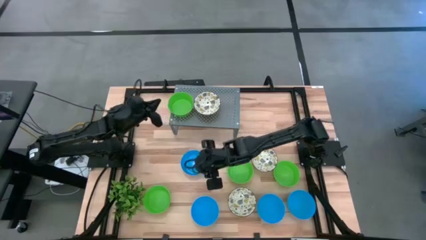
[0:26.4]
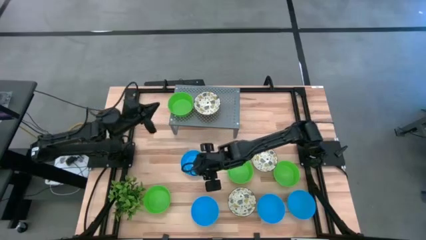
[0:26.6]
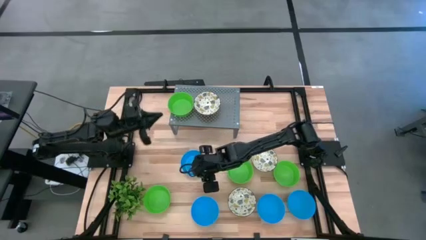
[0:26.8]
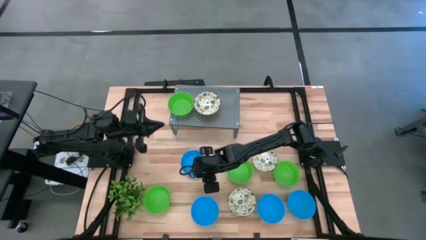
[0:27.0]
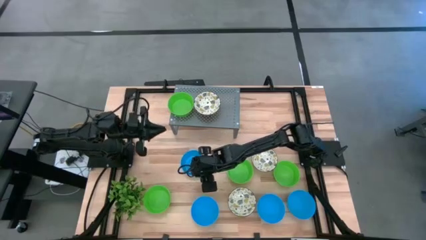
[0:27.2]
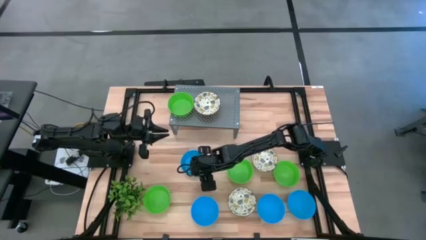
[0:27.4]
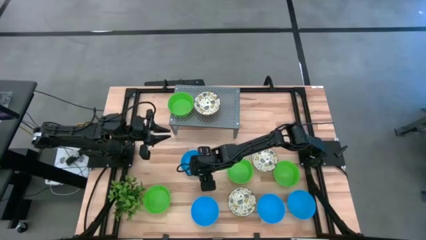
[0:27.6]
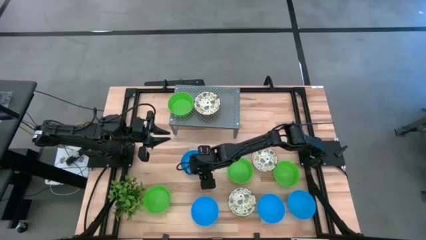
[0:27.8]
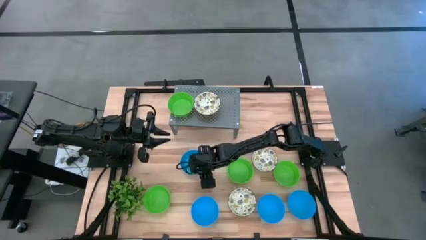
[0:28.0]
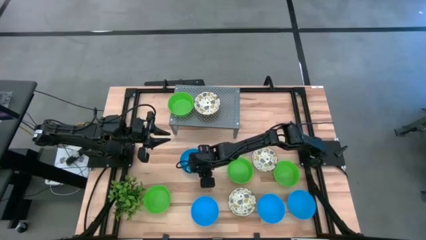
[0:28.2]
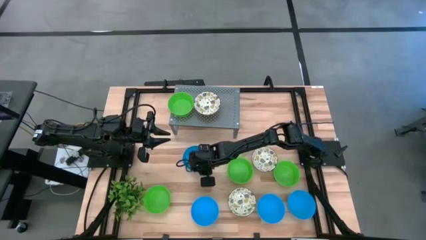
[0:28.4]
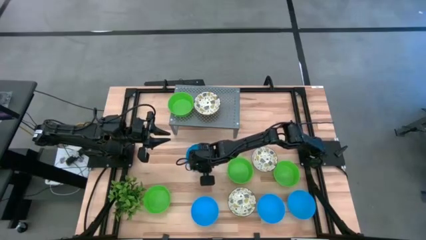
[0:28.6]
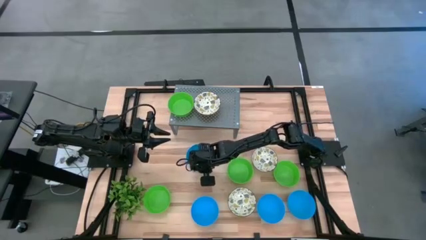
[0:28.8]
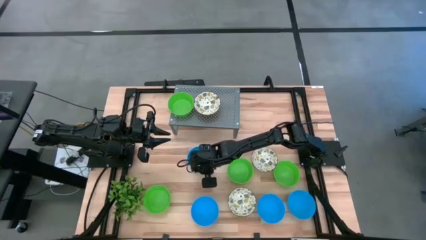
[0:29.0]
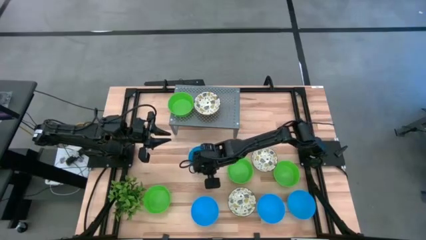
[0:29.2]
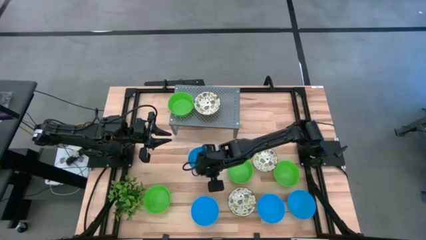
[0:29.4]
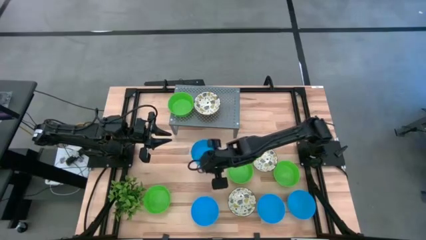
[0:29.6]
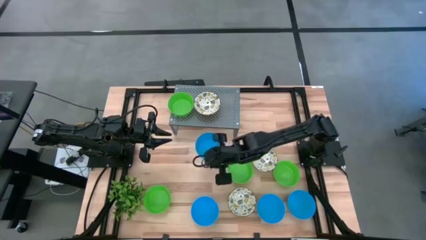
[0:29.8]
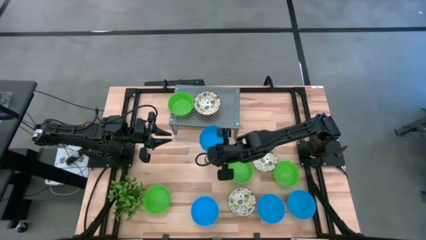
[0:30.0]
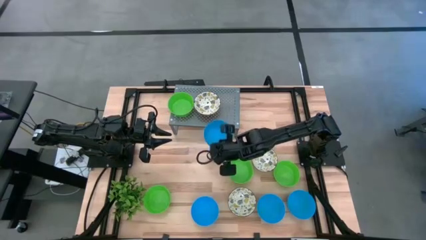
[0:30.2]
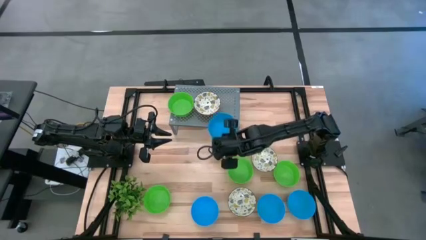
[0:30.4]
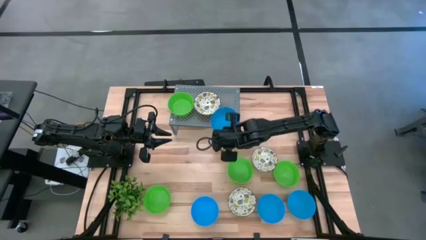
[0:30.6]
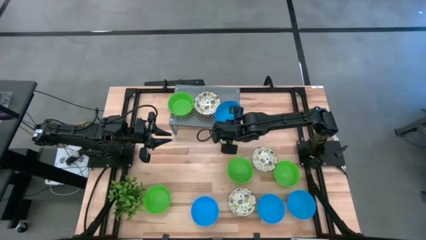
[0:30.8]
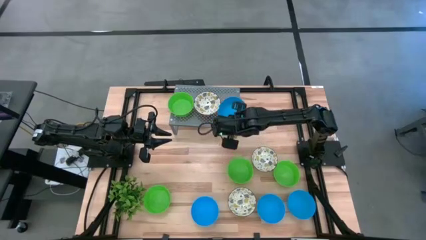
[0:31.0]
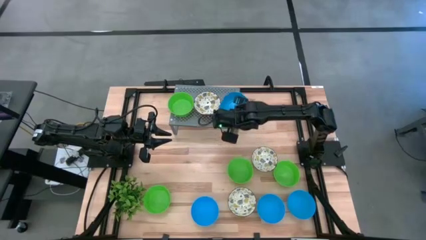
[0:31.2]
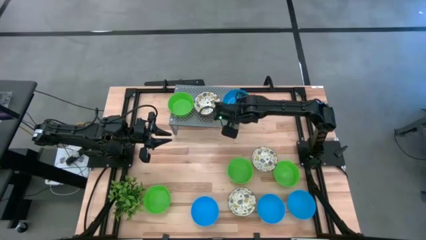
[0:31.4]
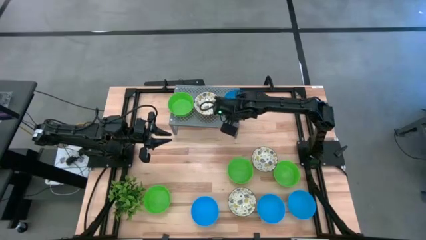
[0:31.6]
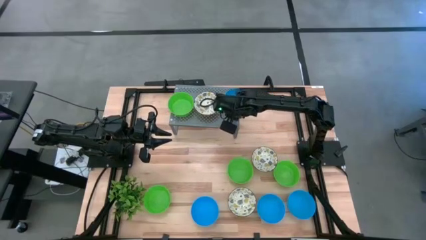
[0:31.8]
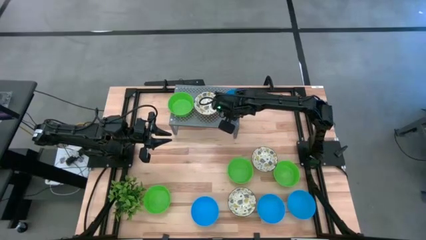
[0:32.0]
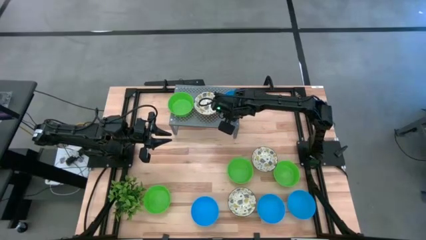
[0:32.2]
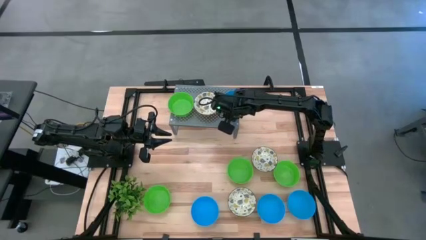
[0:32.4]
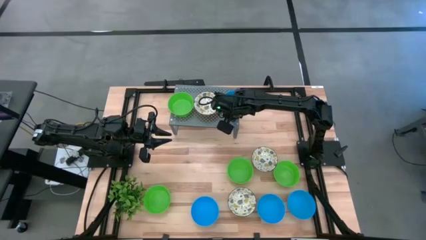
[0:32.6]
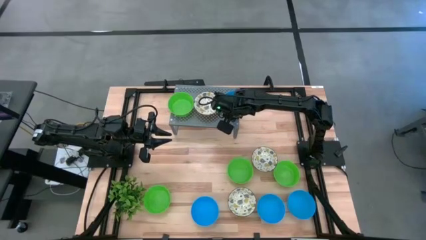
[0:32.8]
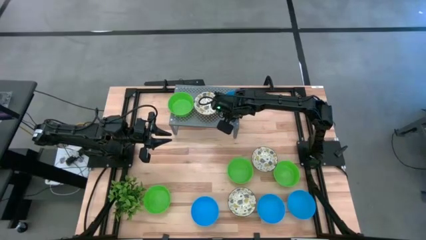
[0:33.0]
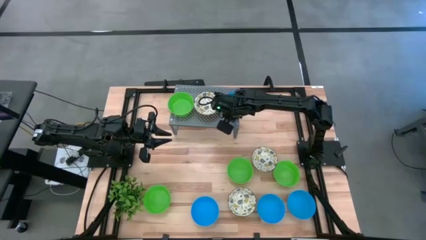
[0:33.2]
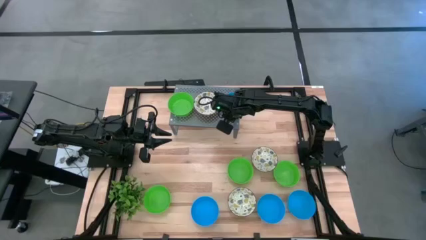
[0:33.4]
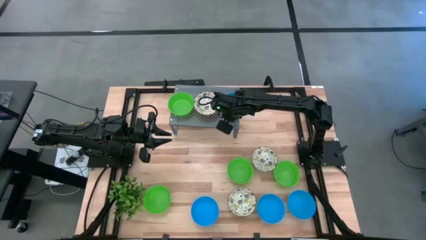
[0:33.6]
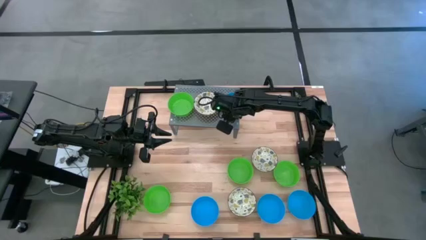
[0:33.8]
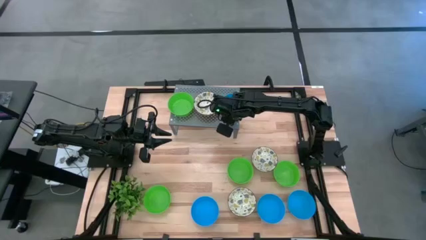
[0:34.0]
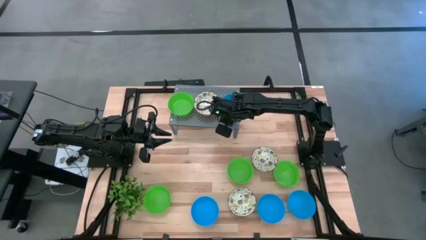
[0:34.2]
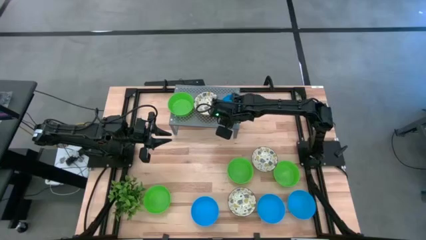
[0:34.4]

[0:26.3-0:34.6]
Task: Pick & Place Mini bowls
Put the blue bowl on the shelf

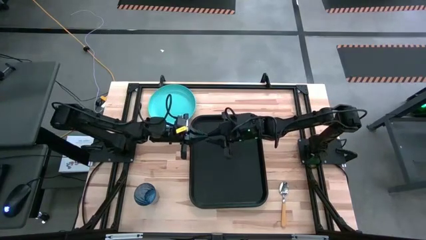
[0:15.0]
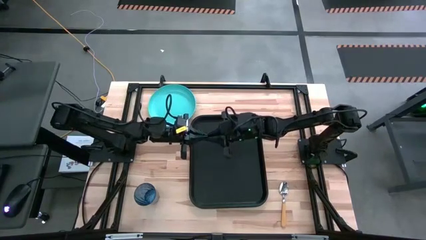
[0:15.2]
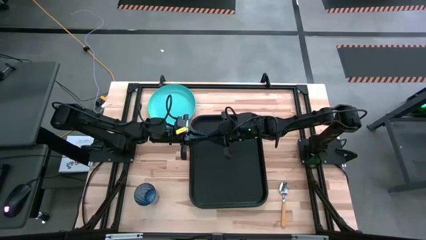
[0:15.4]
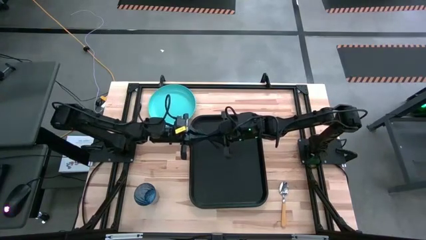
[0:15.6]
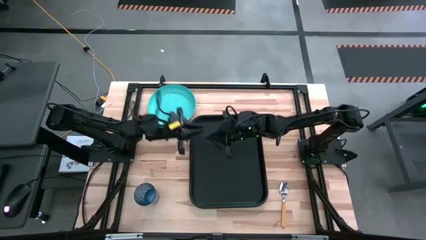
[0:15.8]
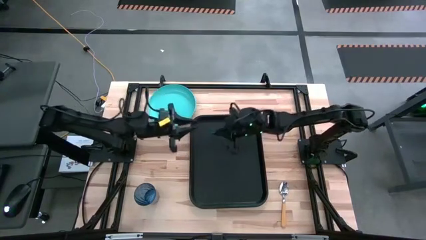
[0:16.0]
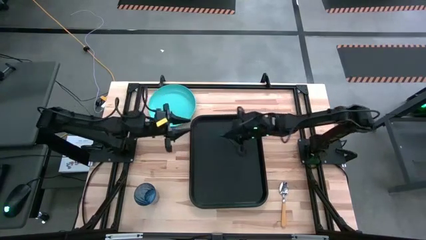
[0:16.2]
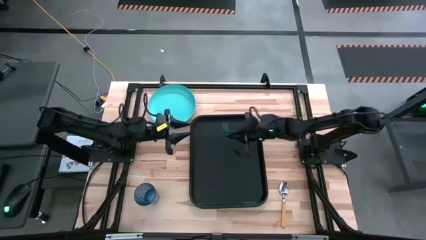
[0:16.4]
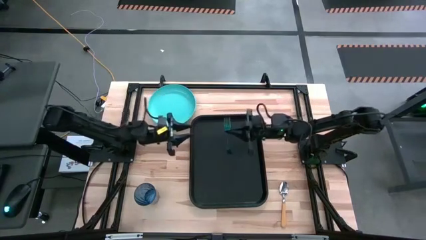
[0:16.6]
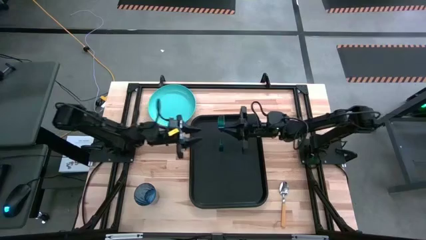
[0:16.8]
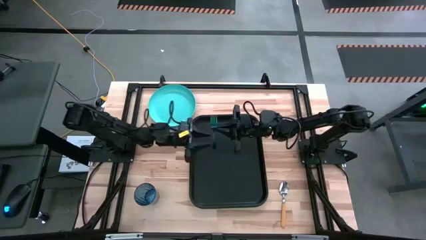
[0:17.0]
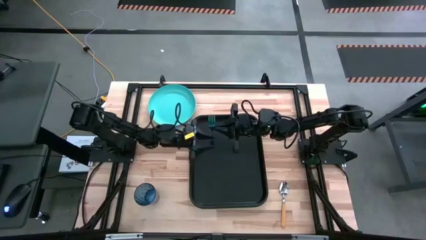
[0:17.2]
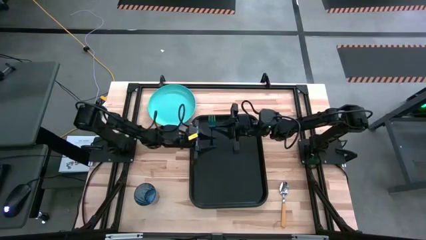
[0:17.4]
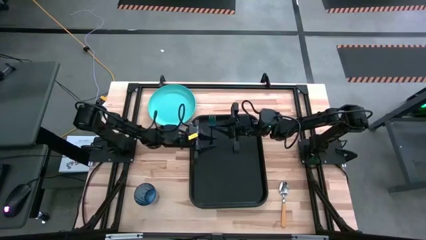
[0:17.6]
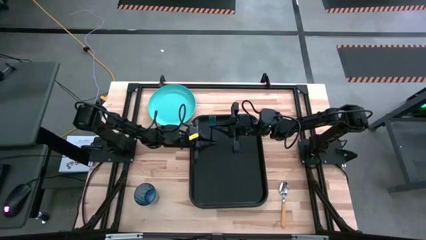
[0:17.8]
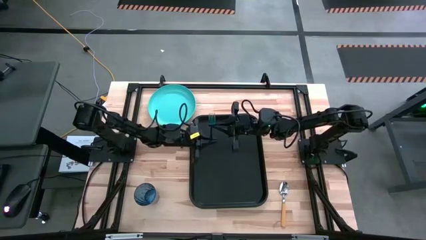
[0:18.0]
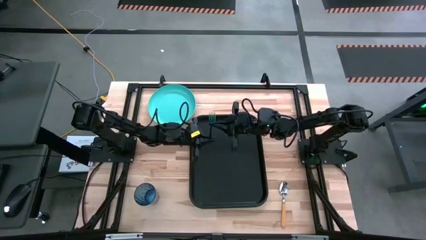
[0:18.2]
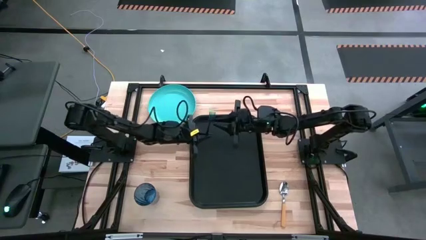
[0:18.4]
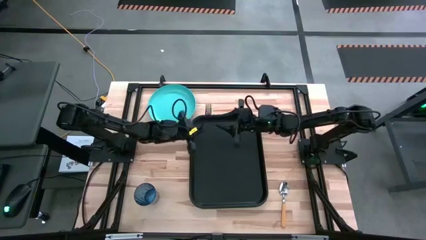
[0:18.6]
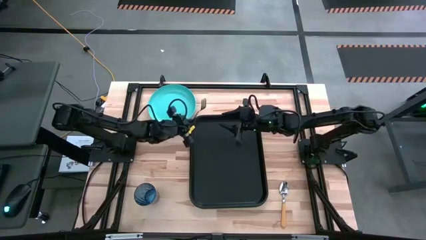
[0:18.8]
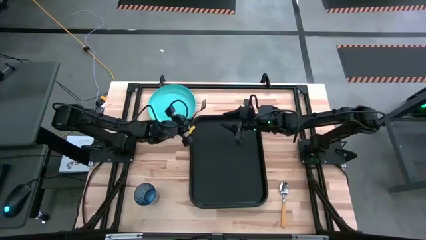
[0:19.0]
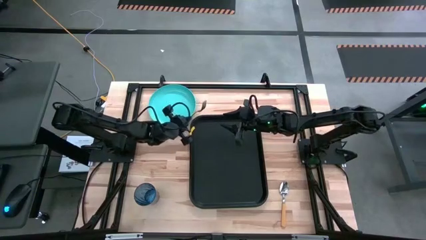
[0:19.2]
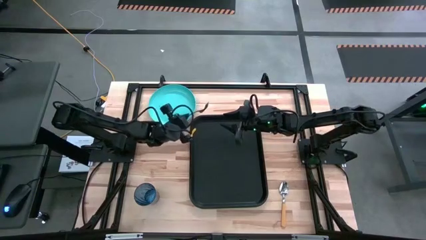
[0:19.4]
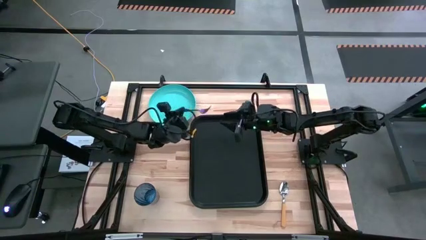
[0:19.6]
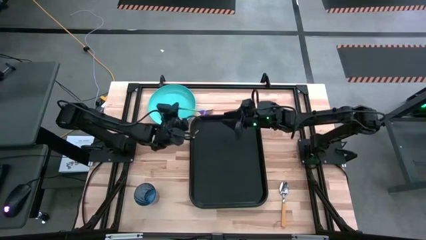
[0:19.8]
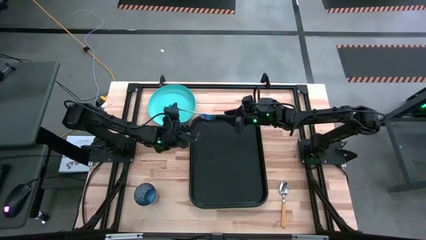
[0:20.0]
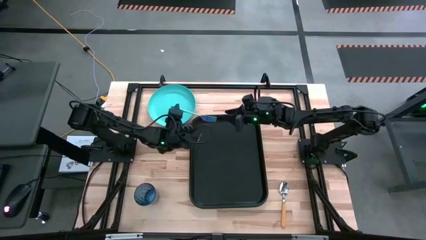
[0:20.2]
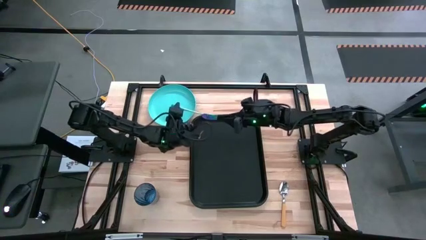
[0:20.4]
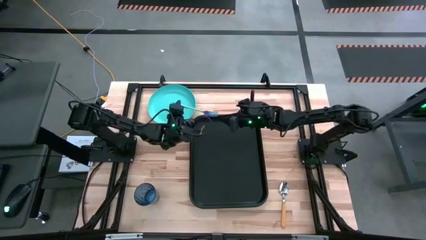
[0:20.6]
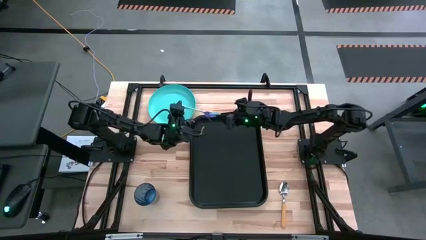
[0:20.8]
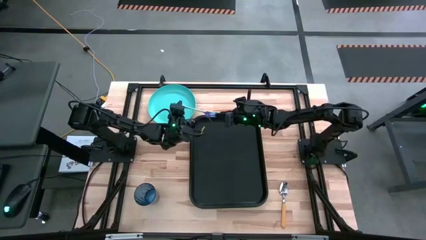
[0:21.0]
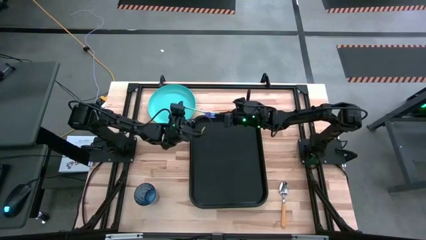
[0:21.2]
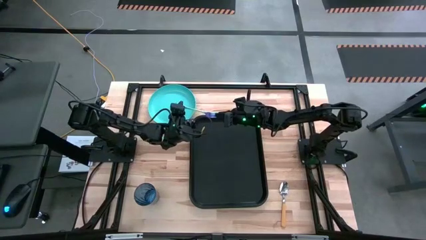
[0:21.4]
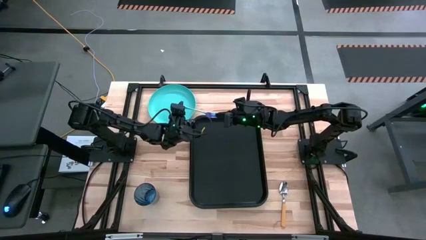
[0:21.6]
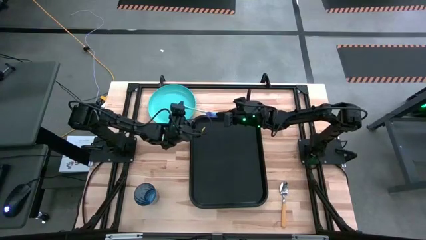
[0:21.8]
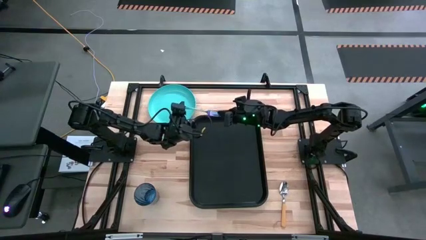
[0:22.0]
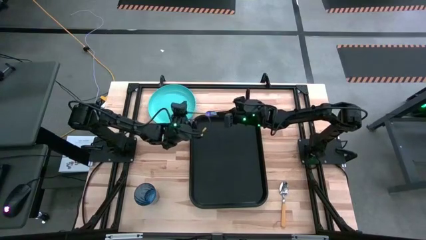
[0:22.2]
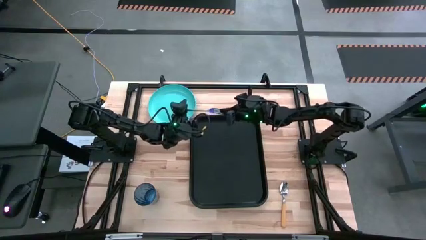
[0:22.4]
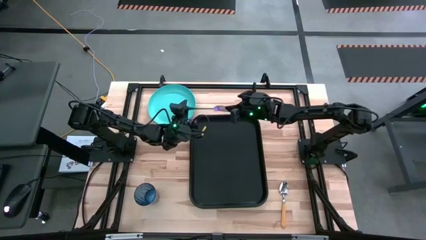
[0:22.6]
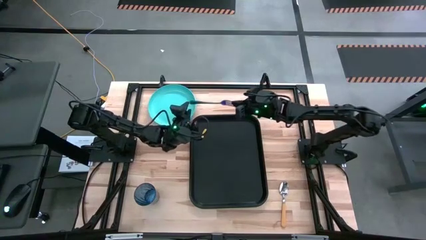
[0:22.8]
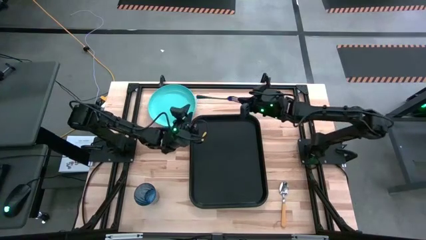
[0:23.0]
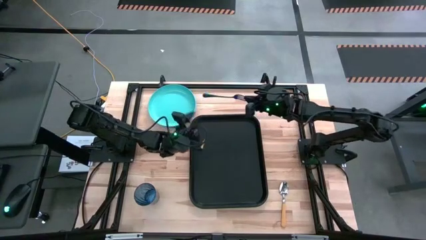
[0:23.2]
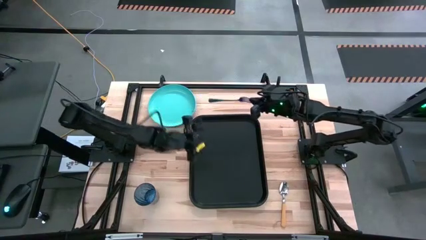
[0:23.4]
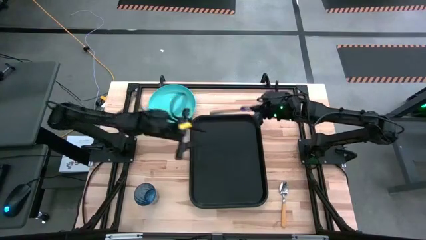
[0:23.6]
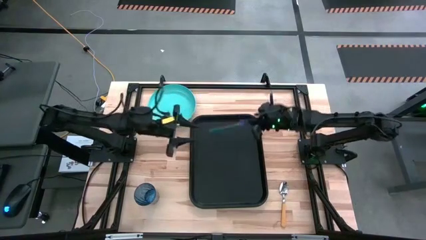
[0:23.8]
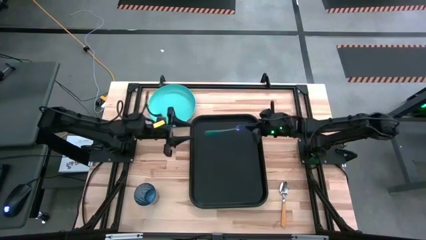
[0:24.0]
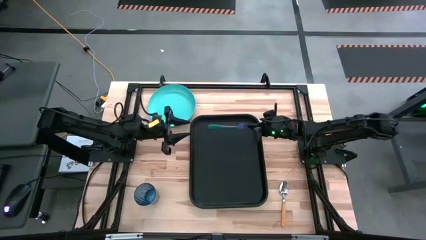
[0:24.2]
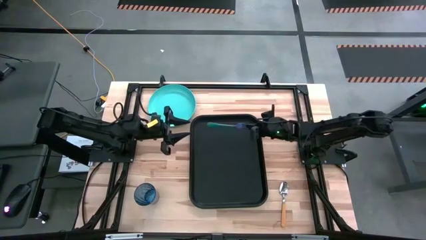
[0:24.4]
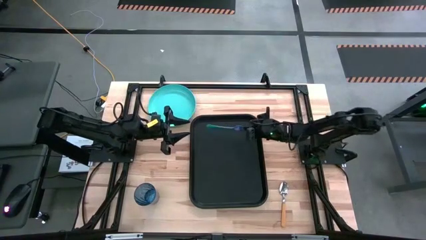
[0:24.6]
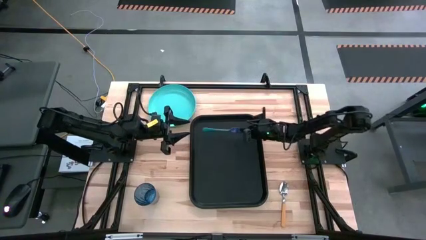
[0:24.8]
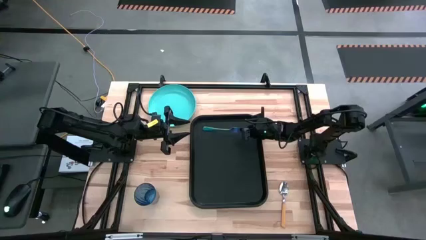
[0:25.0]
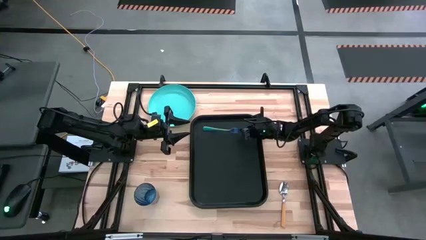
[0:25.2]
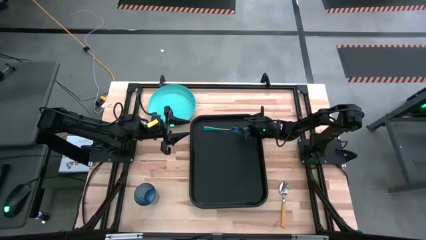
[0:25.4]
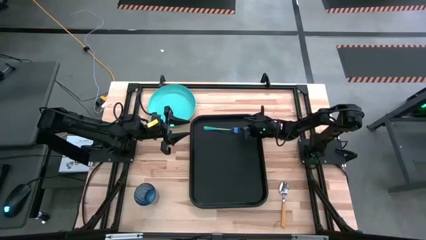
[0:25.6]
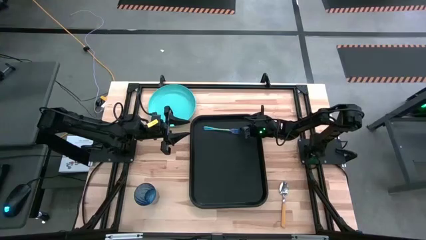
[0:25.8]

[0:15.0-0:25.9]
Task: Pick and place plate/cup/fork/spoon on tray
Put the blue fork on the left side of the black tray
